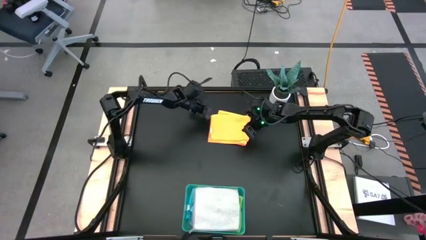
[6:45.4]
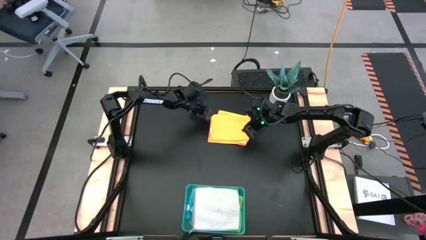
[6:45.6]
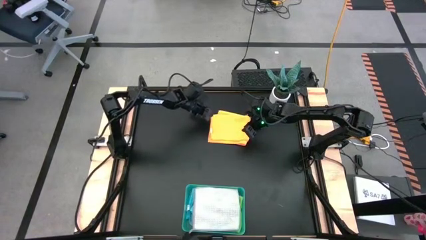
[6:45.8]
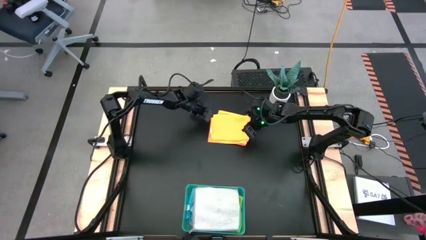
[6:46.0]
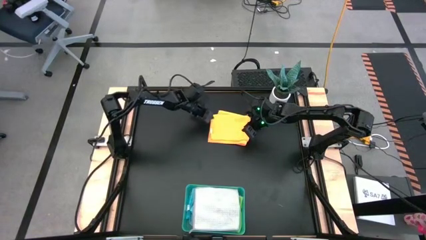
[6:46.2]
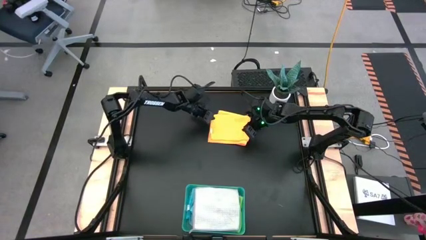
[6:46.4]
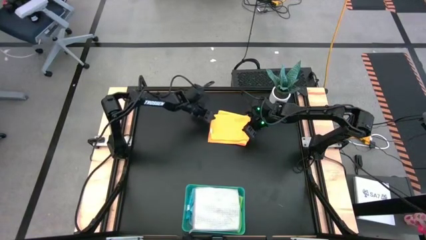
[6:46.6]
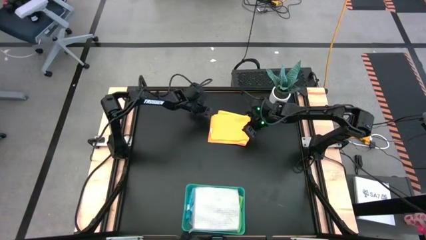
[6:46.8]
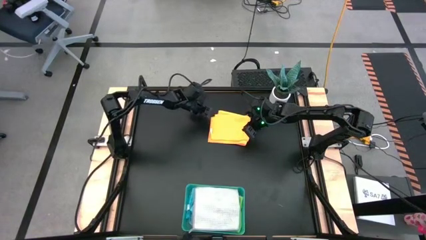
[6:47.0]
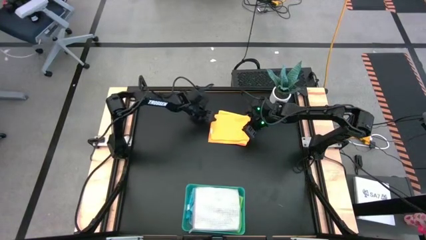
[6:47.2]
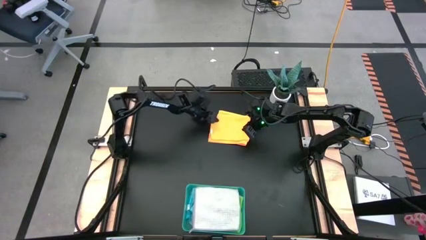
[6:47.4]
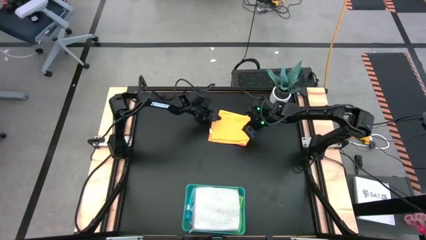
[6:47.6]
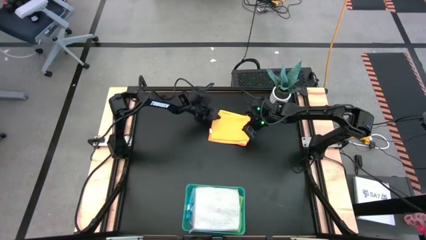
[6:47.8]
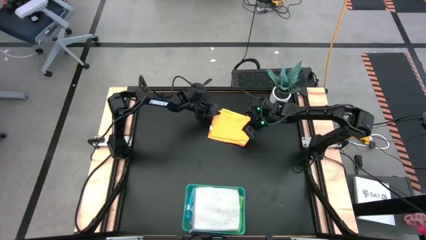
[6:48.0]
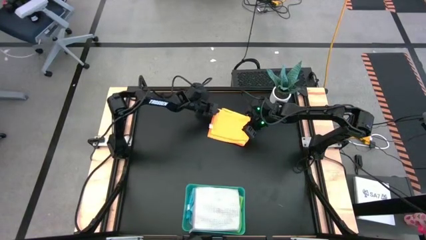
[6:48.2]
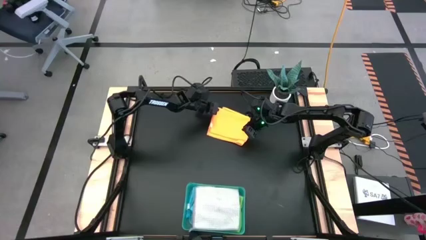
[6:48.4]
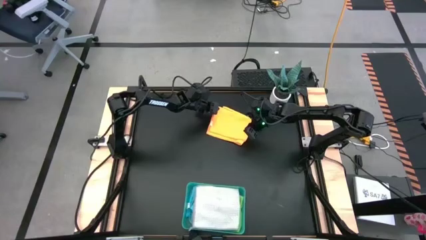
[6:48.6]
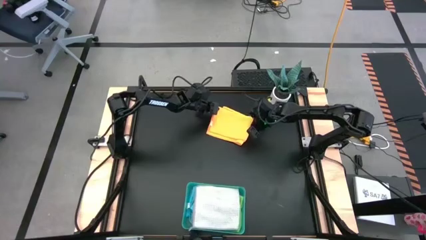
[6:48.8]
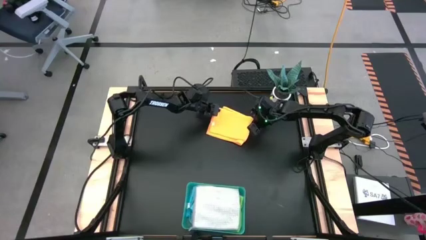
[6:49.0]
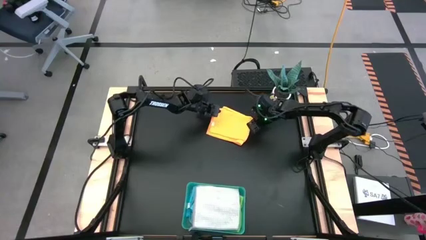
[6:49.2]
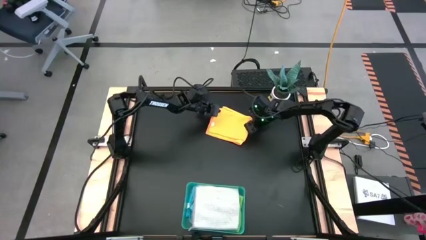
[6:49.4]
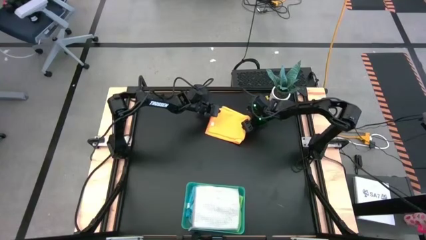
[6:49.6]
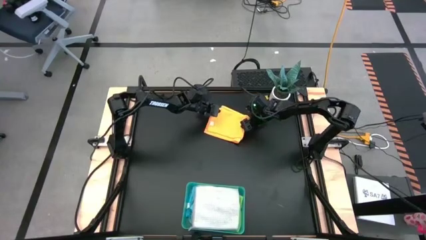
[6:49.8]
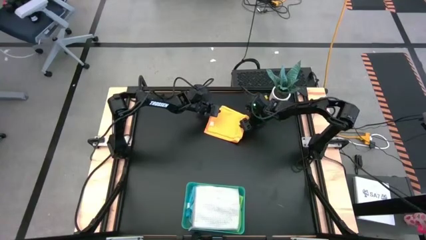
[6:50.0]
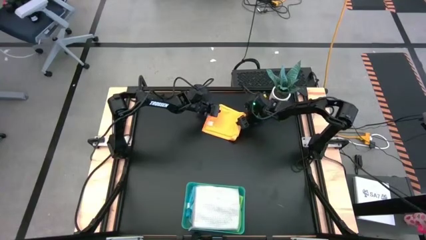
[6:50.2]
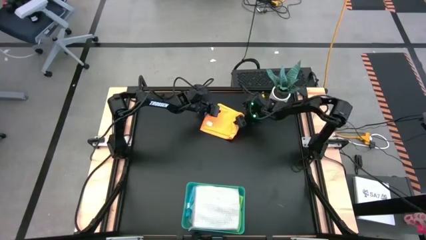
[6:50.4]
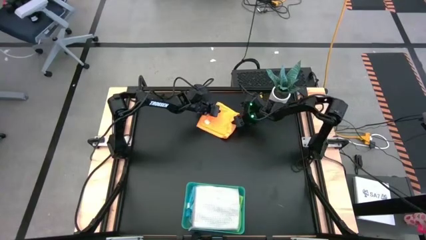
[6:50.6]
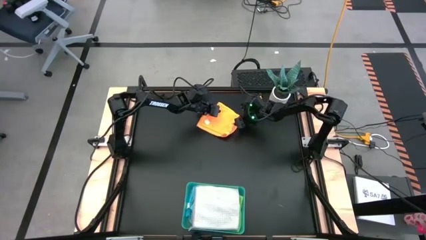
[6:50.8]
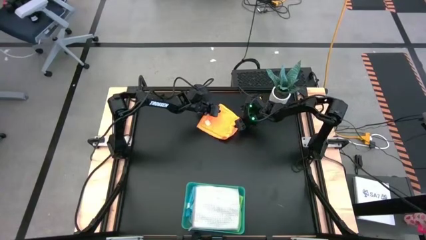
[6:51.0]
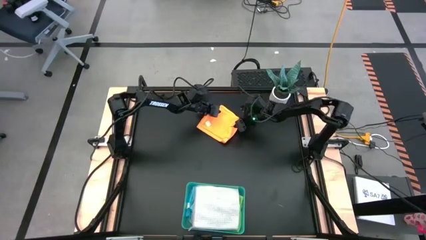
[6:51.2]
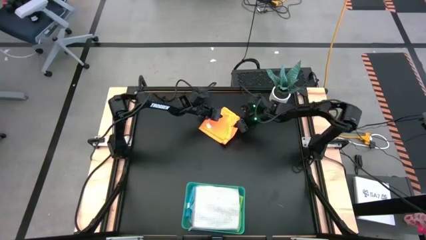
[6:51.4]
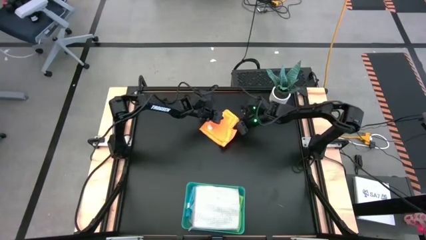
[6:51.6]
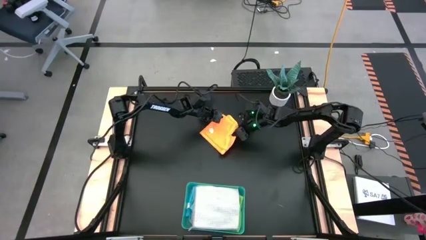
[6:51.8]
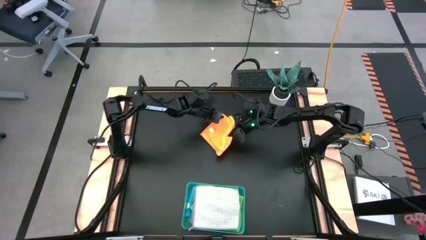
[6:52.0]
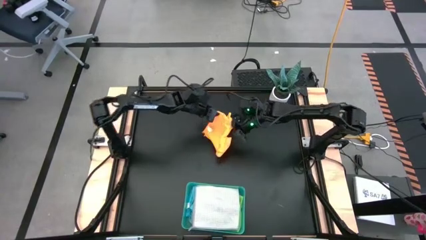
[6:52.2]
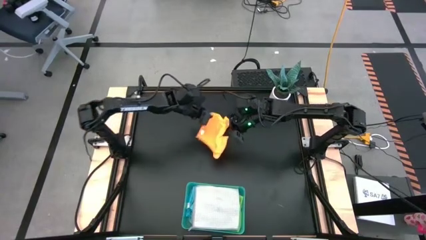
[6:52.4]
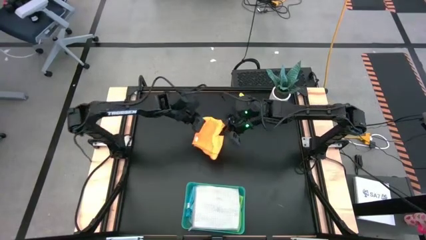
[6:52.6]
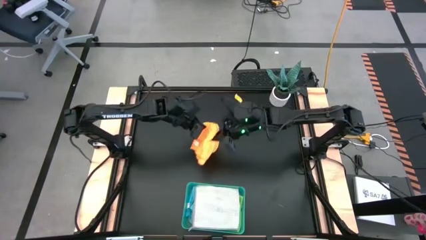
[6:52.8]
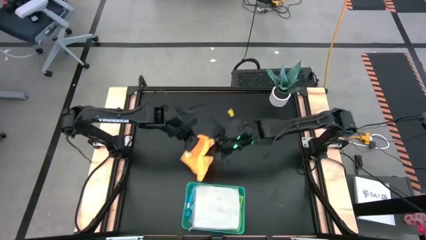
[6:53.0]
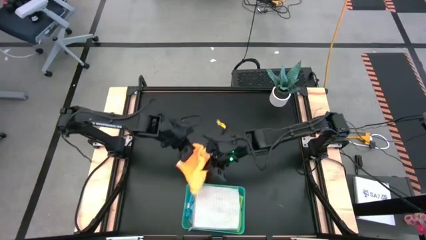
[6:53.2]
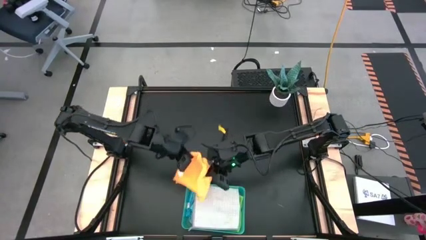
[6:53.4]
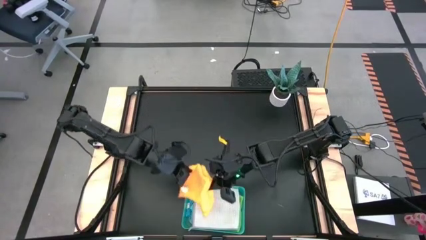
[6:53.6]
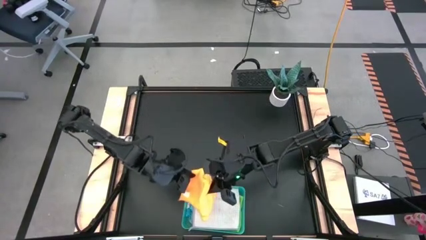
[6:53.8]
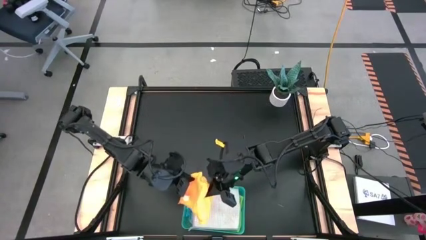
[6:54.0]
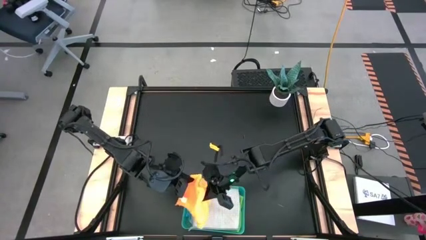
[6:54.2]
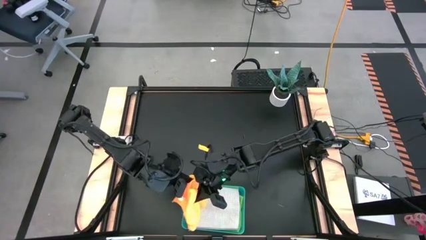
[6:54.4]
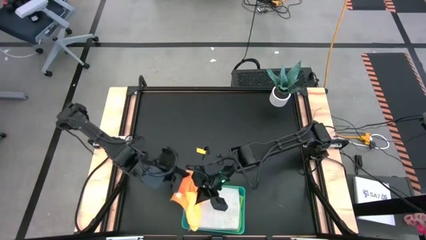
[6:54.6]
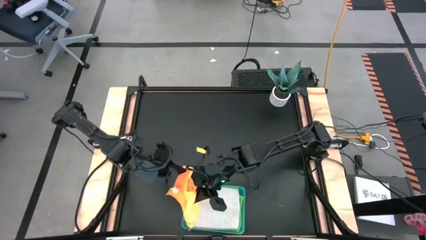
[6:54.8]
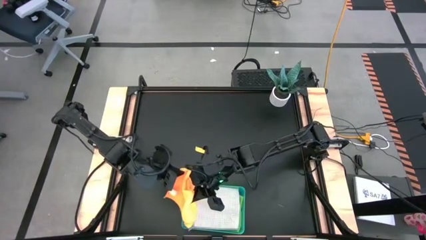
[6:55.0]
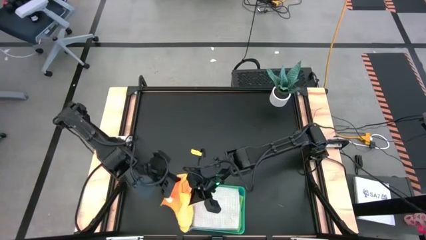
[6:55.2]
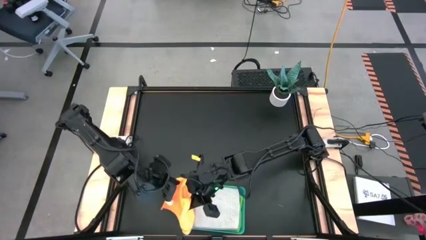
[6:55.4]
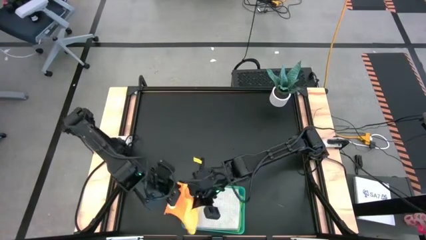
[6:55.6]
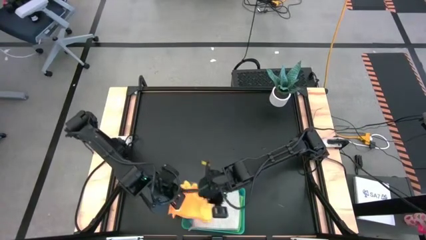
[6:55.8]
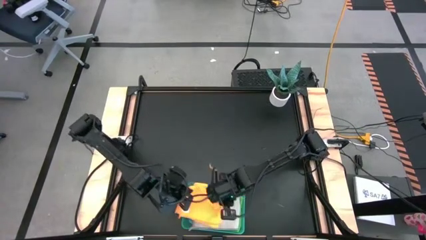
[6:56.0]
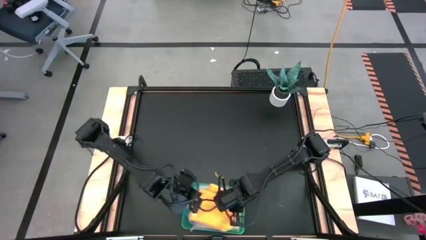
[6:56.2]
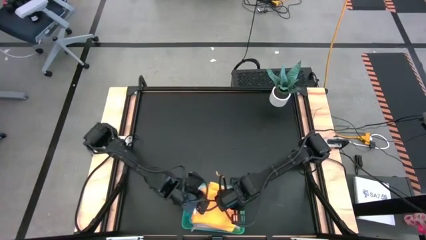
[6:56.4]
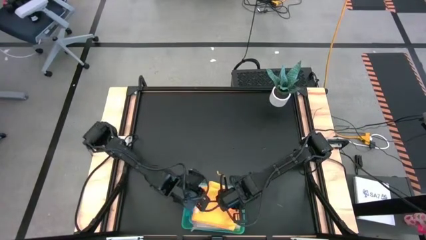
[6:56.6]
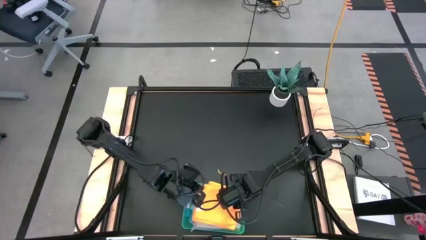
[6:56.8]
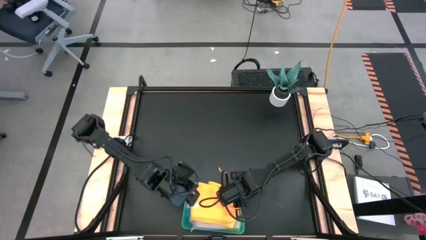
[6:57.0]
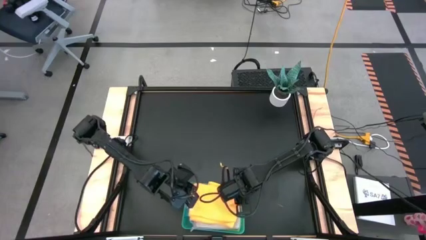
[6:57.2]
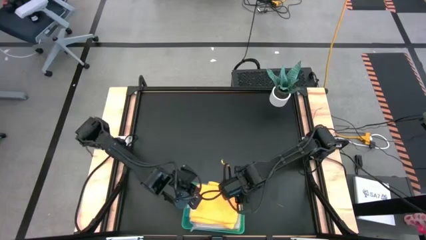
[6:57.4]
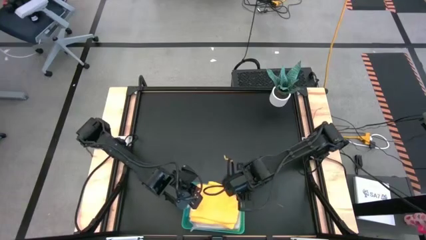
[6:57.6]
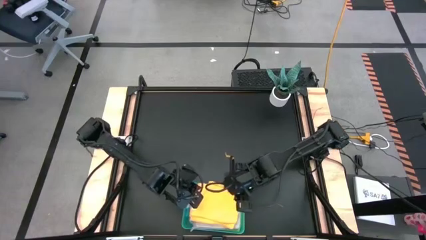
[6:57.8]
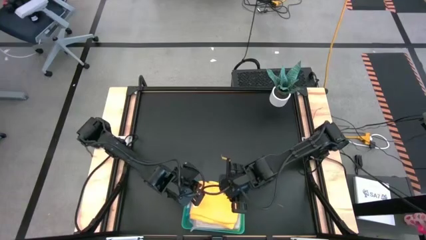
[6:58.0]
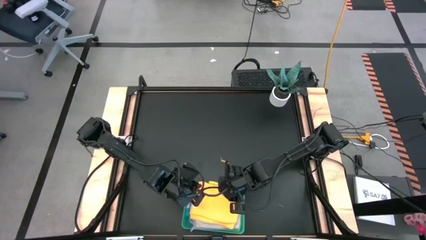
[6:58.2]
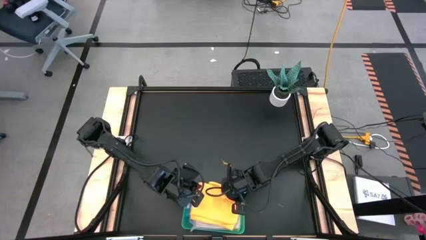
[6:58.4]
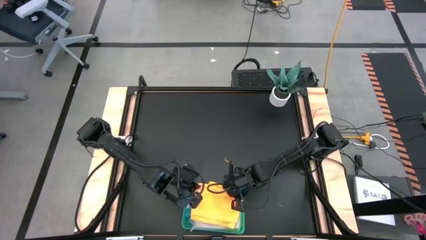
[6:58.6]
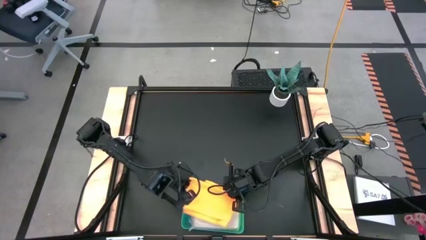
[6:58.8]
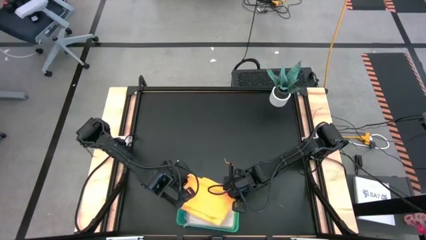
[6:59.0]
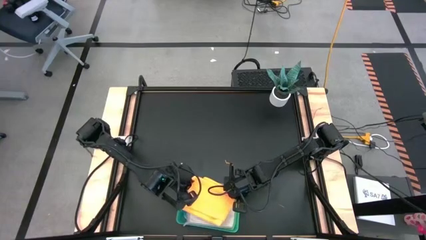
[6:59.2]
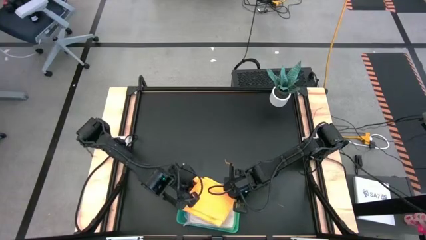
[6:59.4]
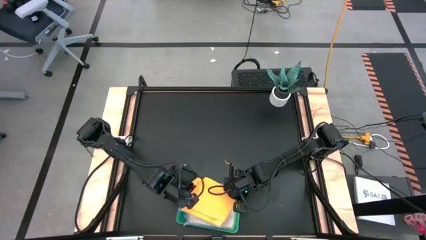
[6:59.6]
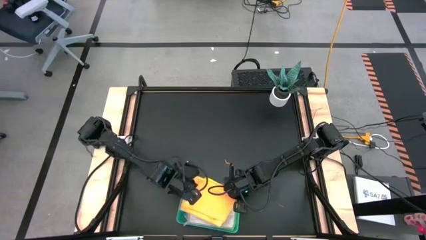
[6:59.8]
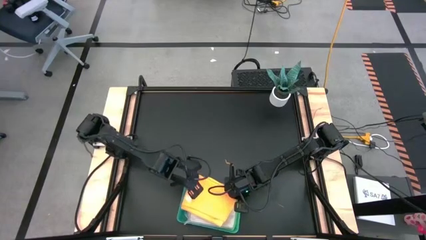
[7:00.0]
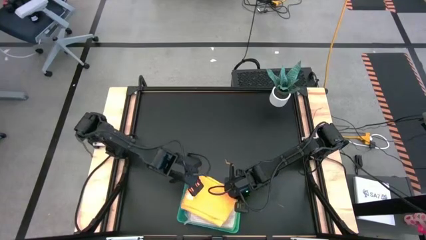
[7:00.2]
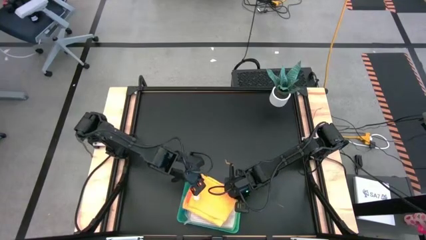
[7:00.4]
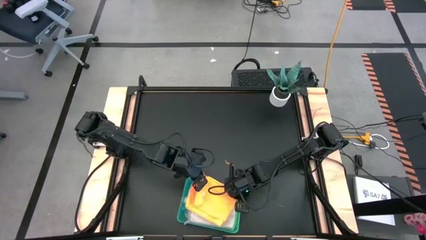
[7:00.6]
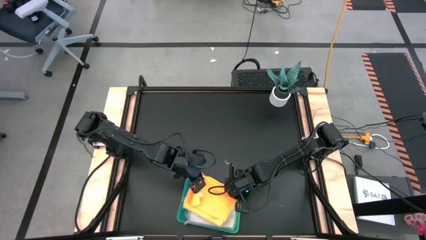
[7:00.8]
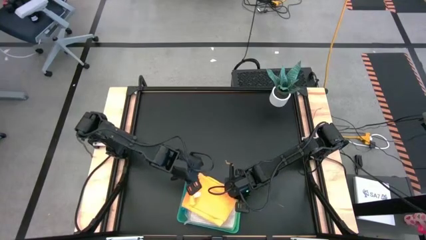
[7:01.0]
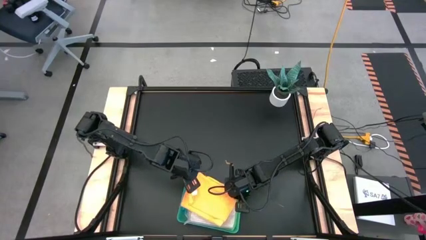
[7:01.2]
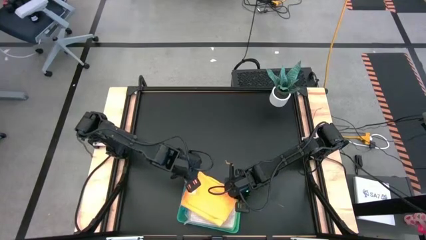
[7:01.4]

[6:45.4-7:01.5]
Task: Fold microfiber towels
Put the folded orange microfiber cloth into the green transparent bin
